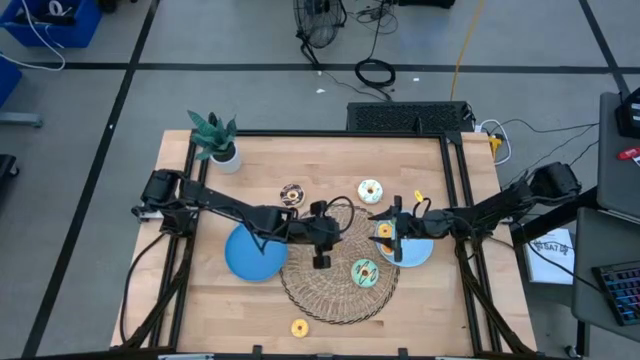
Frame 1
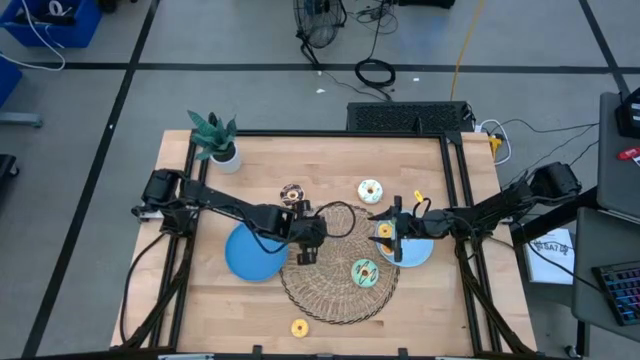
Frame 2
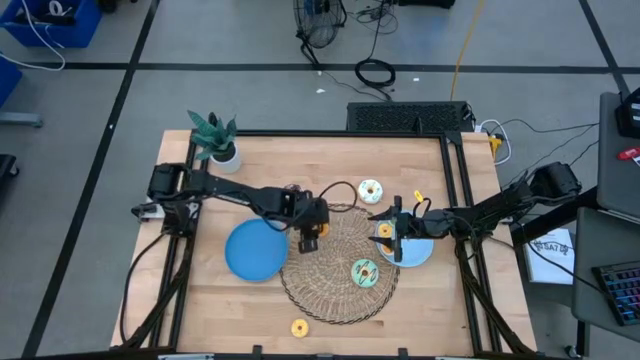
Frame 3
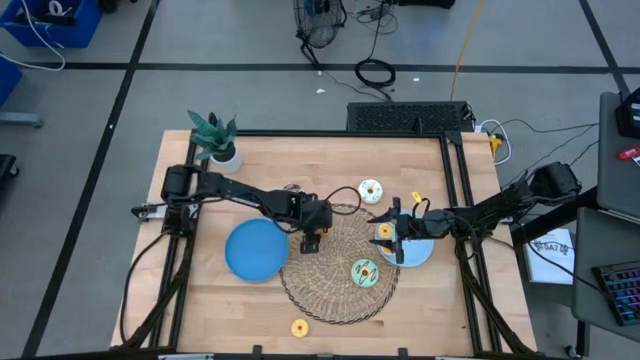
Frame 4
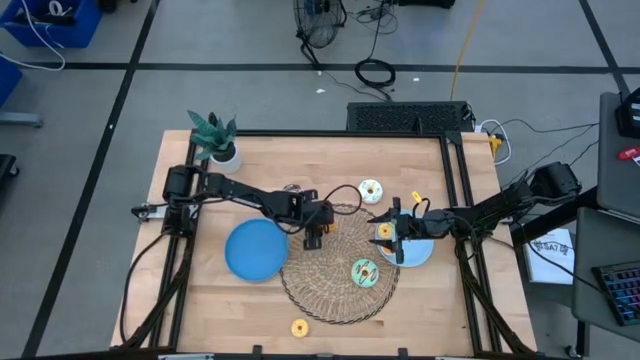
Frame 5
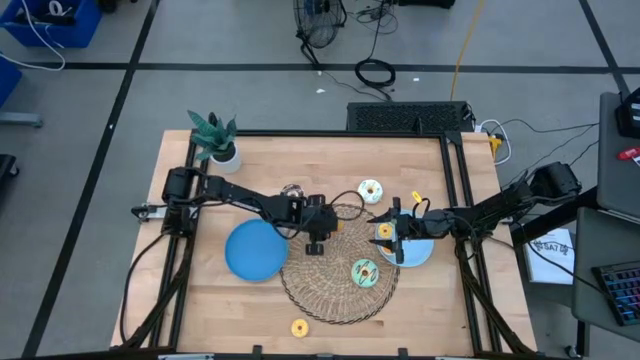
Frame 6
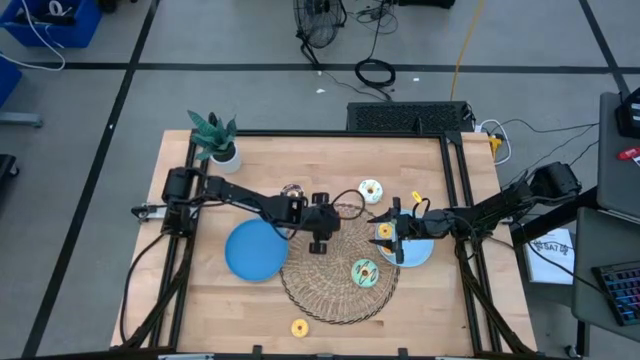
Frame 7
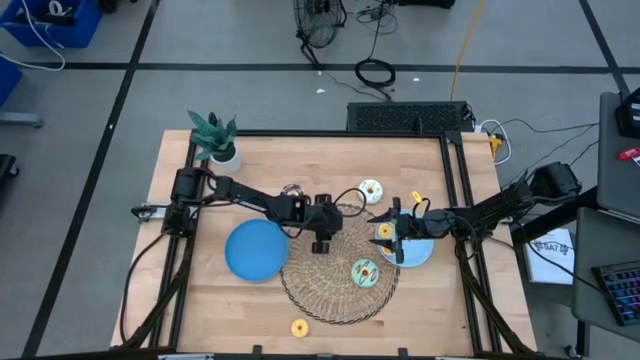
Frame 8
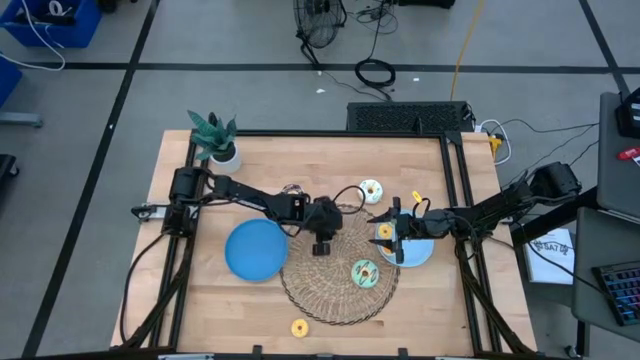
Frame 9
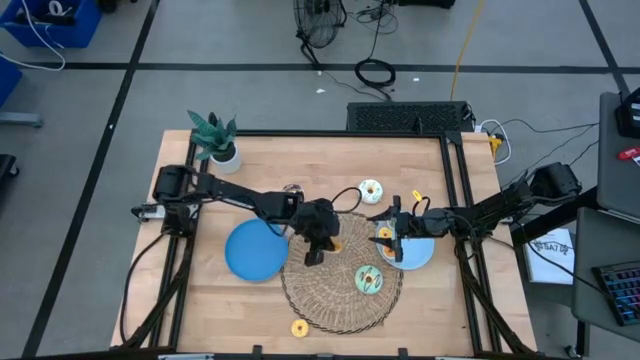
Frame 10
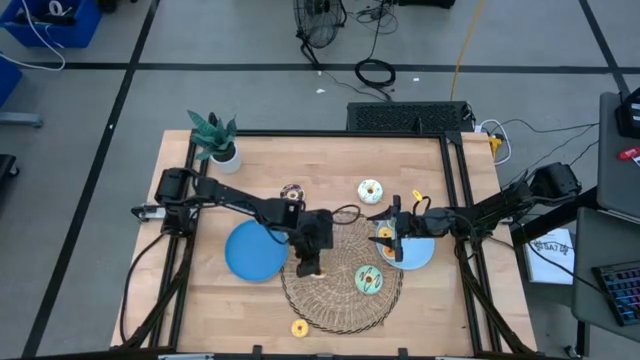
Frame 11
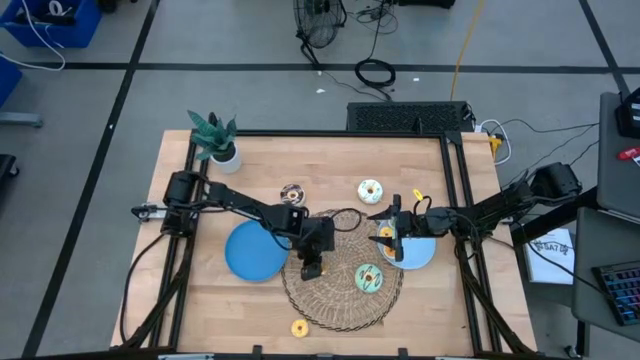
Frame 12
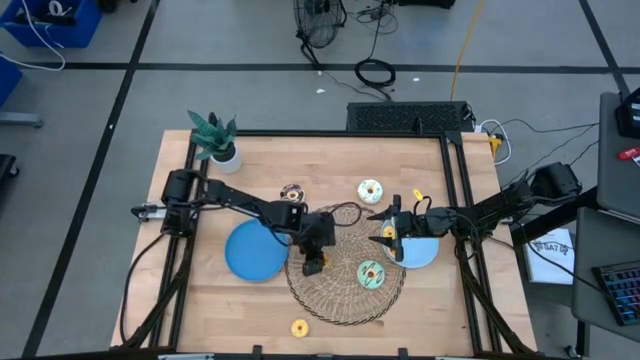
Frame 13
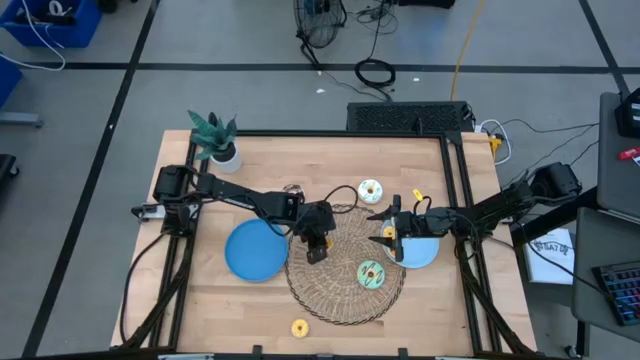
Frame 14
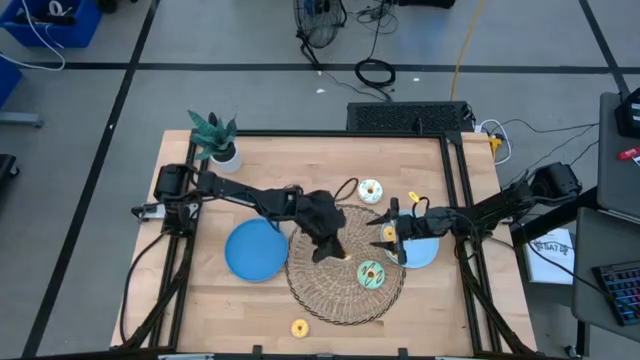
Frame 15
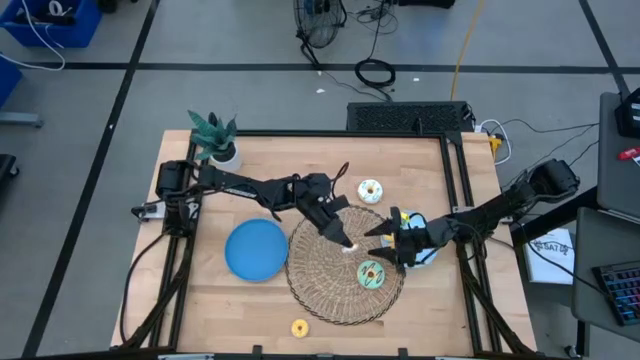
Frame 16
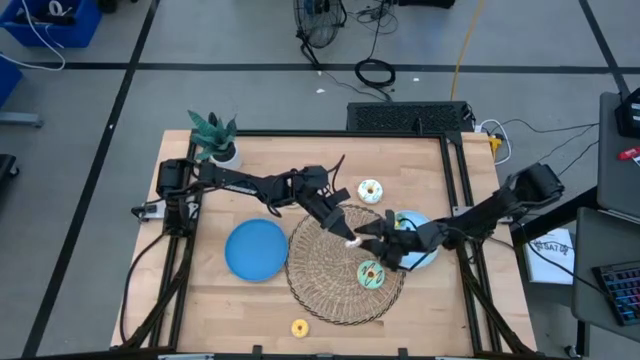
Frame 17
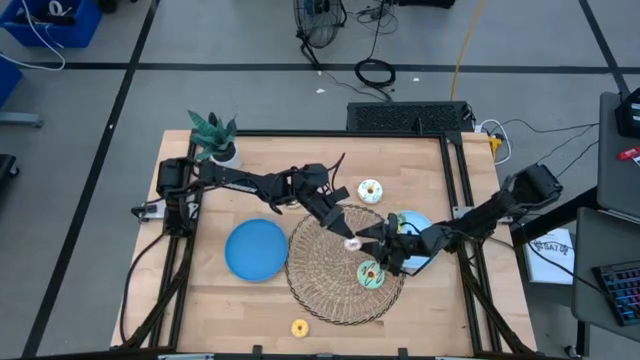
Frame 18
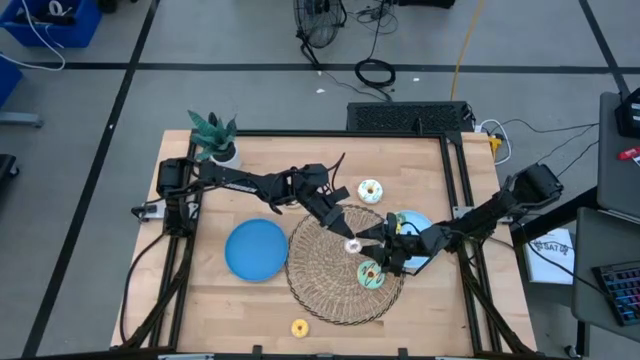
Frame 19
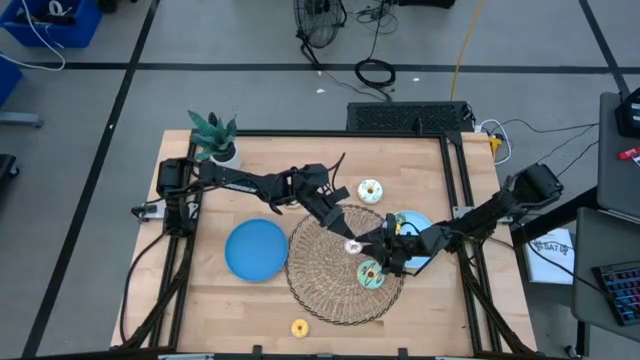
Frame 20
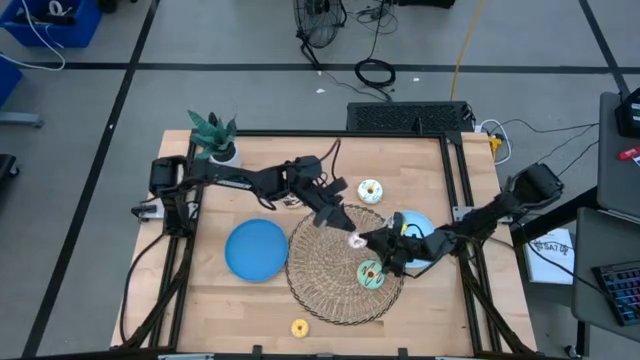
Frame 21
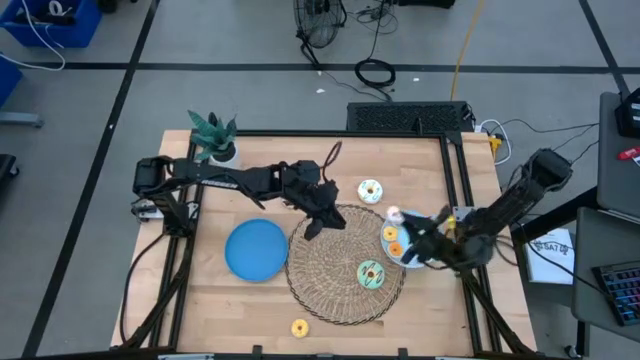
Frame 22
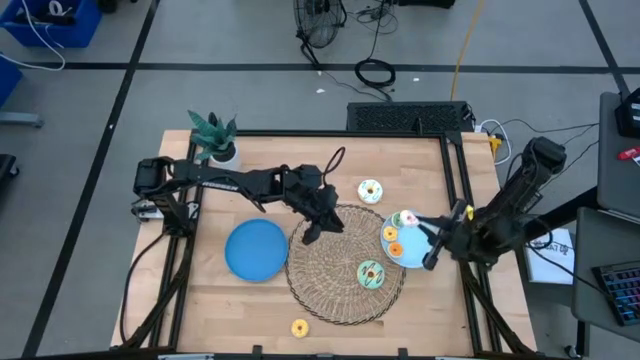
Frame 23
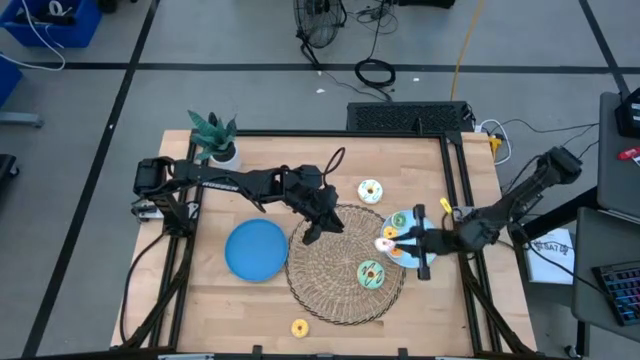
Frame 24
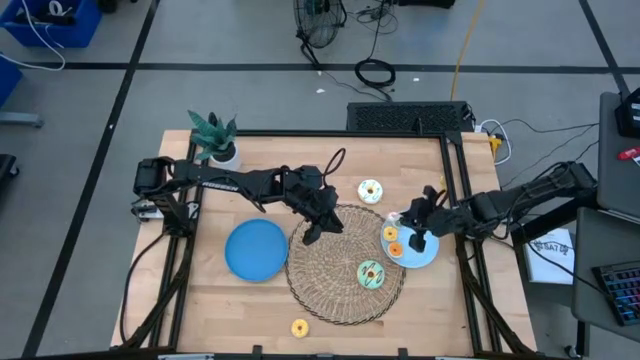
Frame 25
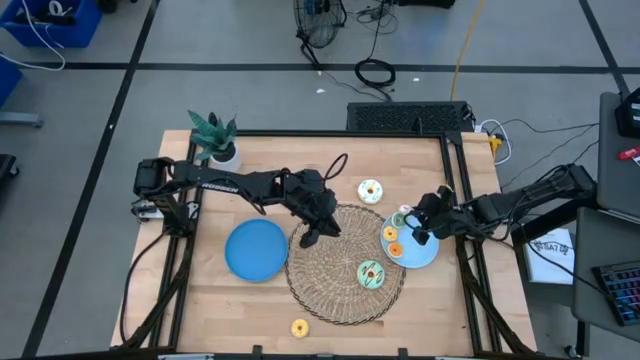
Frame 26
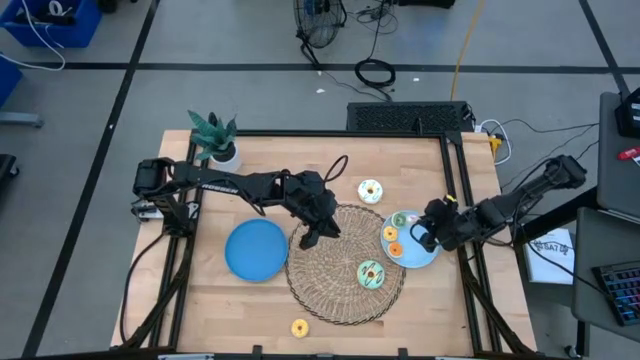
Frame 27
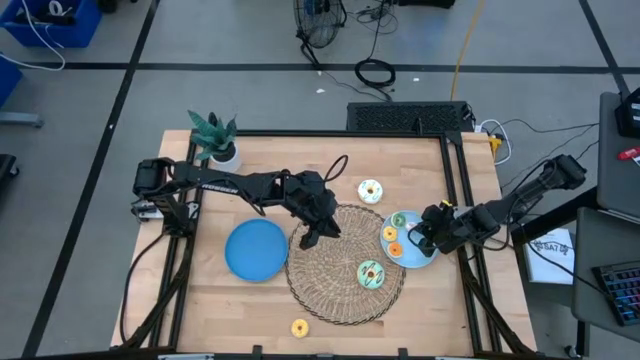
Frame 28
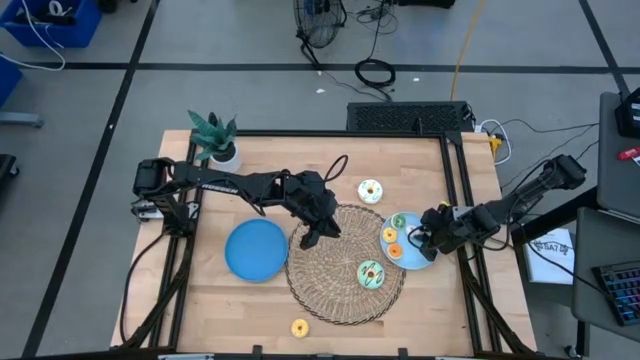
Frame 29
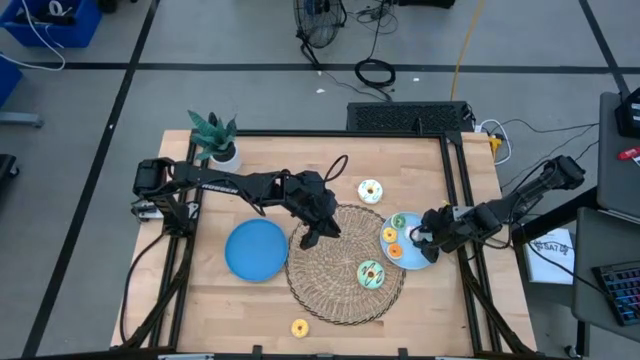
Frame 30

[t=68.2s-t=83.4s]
Task: Pick & Place donuts
Put the small white donut on the light blue plate
